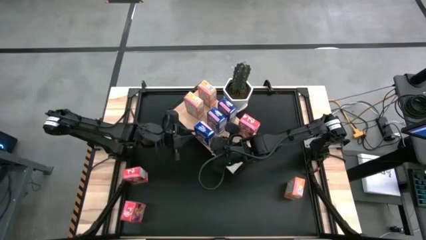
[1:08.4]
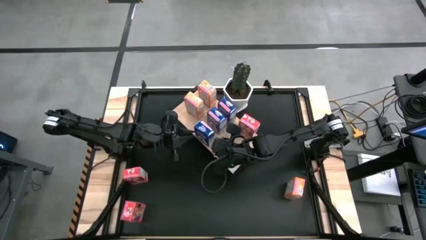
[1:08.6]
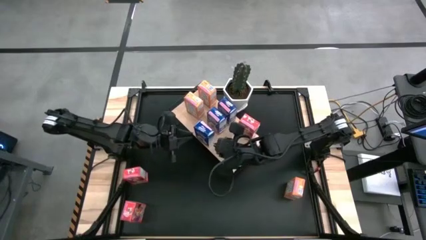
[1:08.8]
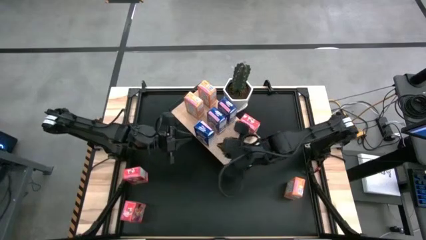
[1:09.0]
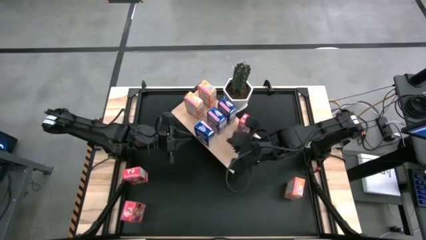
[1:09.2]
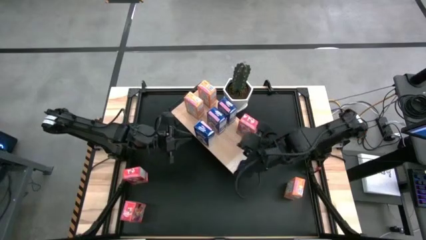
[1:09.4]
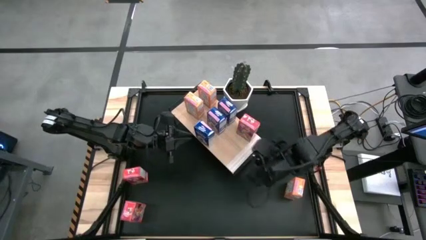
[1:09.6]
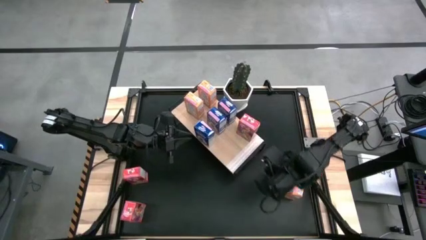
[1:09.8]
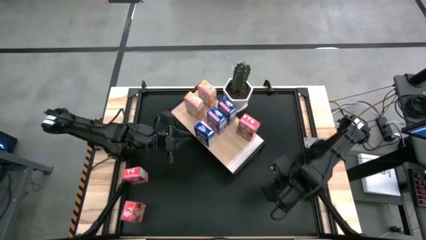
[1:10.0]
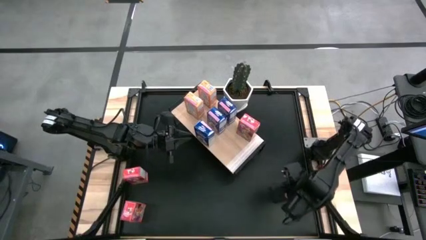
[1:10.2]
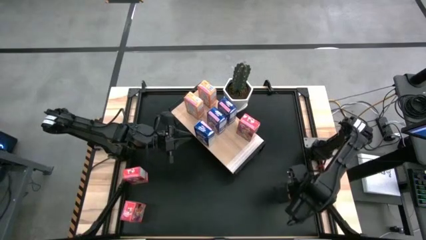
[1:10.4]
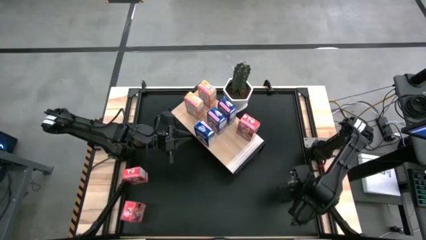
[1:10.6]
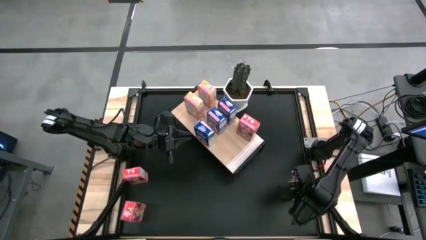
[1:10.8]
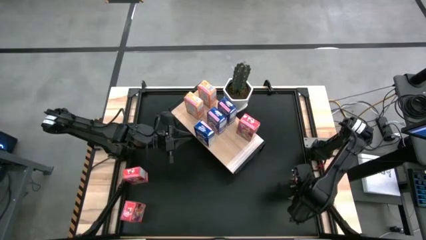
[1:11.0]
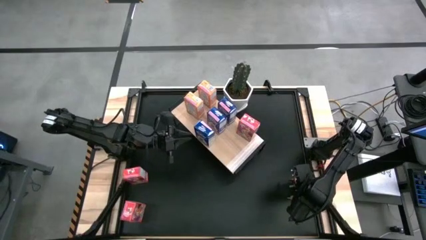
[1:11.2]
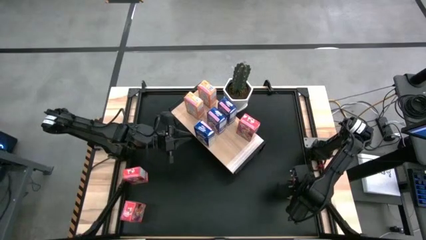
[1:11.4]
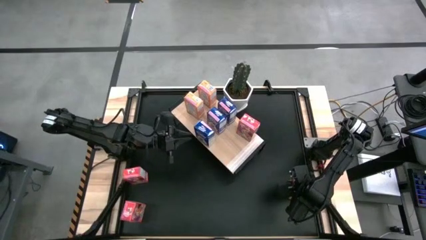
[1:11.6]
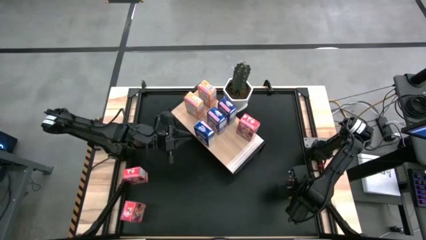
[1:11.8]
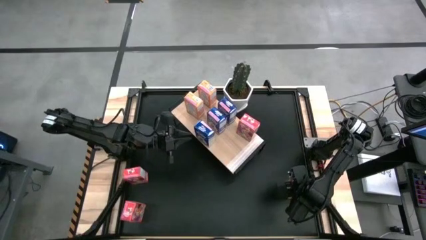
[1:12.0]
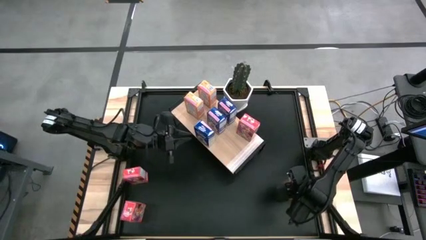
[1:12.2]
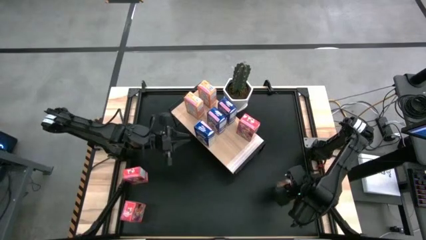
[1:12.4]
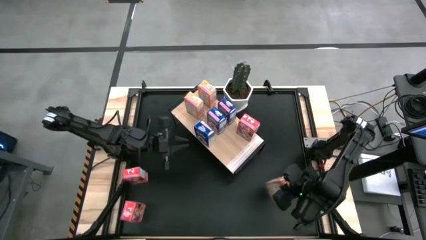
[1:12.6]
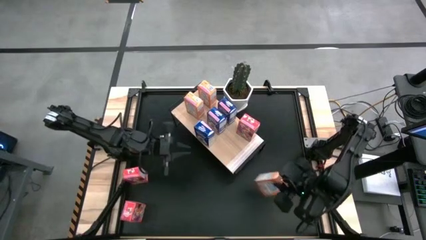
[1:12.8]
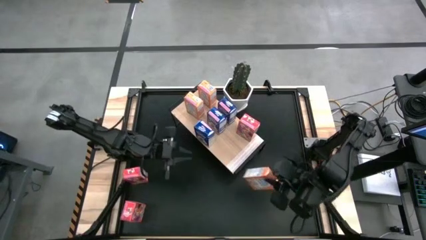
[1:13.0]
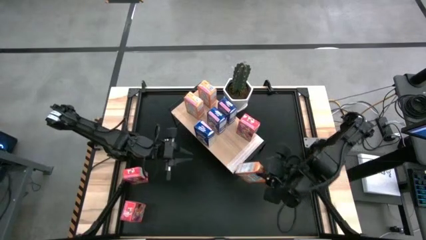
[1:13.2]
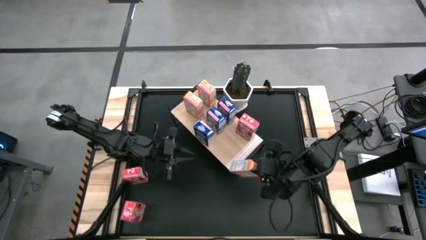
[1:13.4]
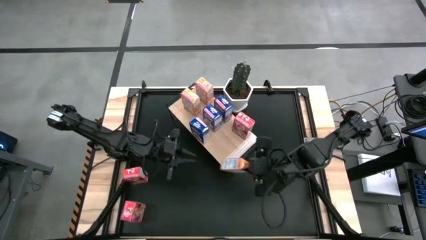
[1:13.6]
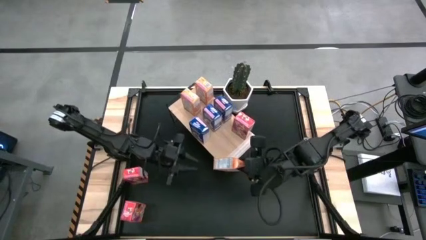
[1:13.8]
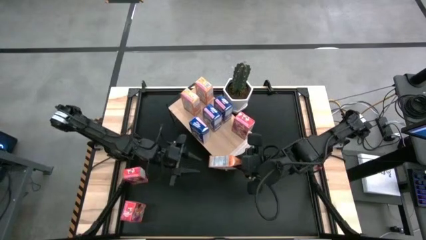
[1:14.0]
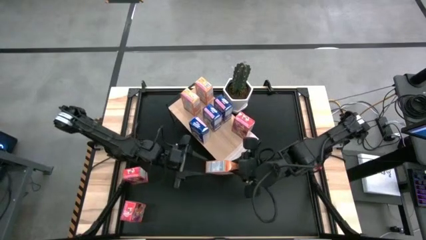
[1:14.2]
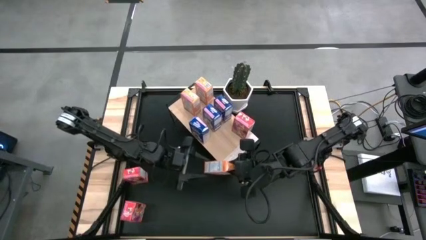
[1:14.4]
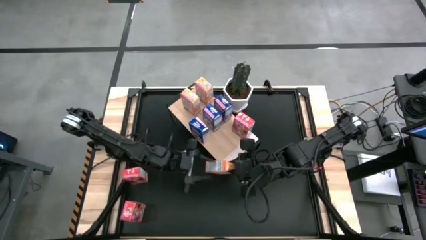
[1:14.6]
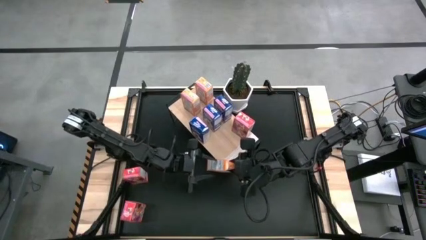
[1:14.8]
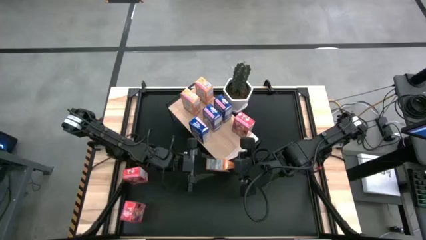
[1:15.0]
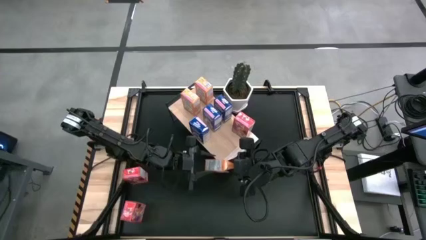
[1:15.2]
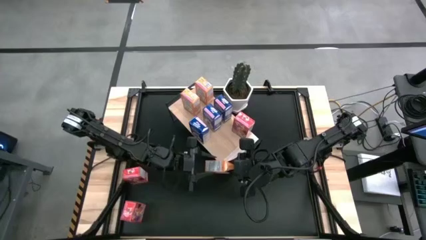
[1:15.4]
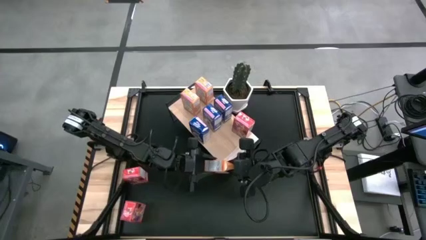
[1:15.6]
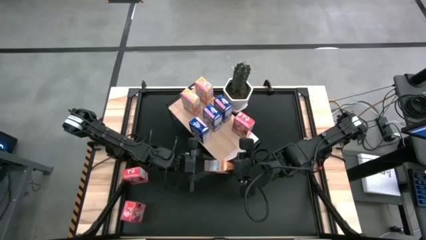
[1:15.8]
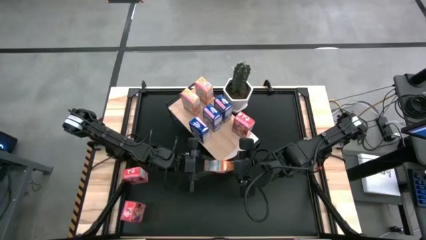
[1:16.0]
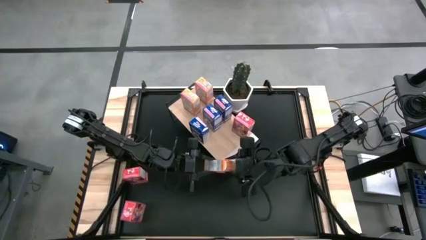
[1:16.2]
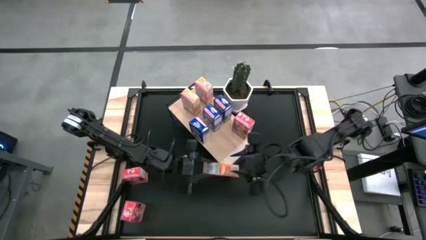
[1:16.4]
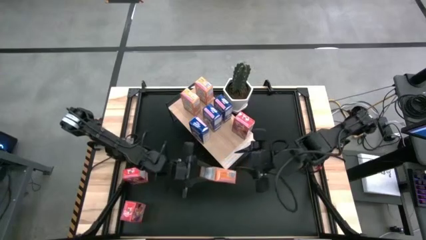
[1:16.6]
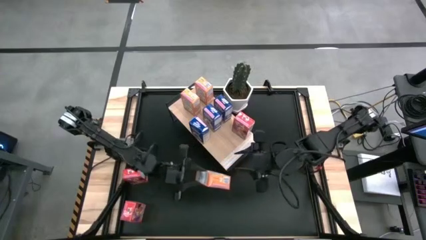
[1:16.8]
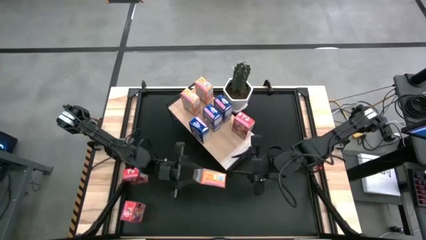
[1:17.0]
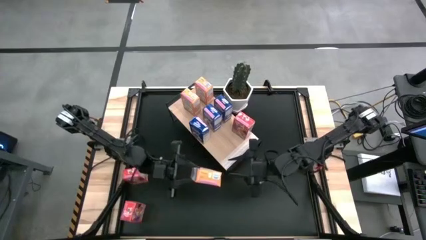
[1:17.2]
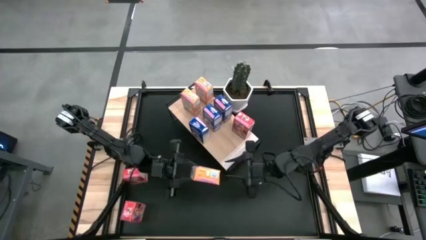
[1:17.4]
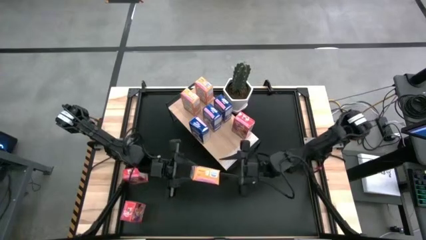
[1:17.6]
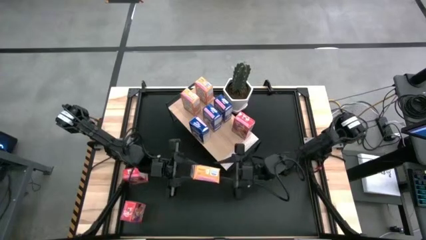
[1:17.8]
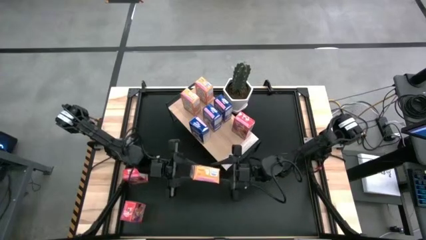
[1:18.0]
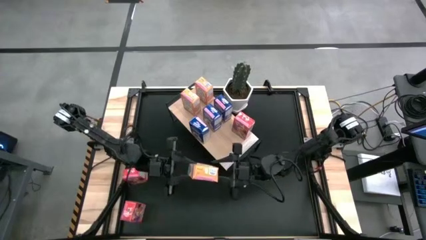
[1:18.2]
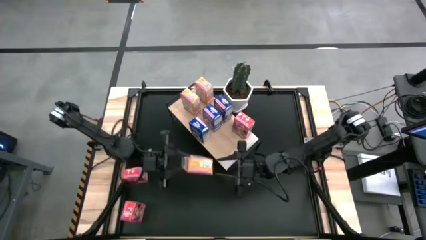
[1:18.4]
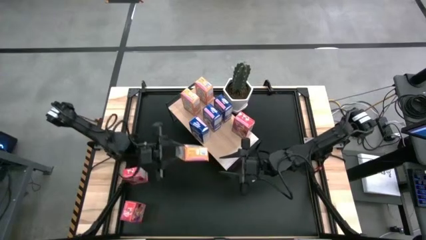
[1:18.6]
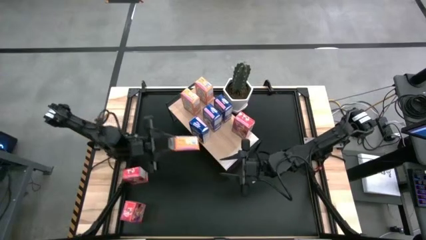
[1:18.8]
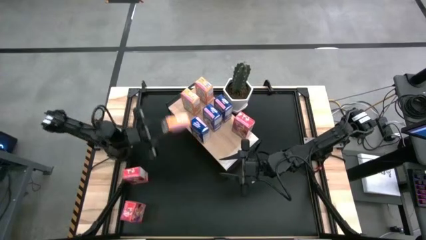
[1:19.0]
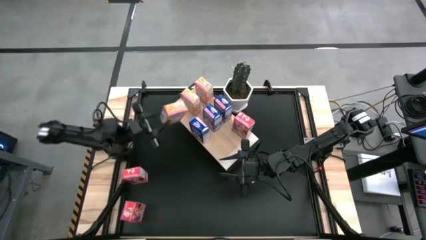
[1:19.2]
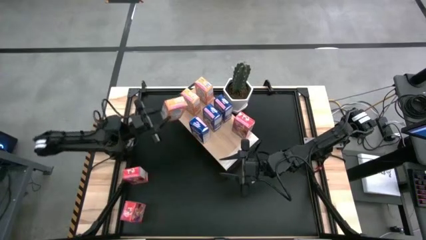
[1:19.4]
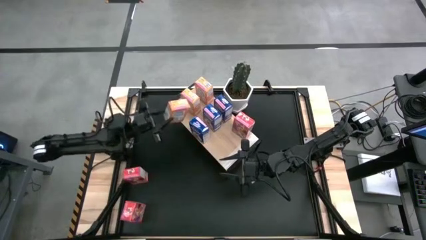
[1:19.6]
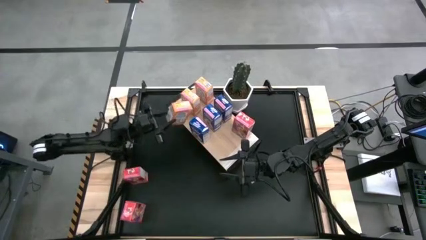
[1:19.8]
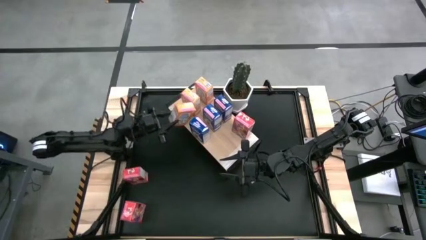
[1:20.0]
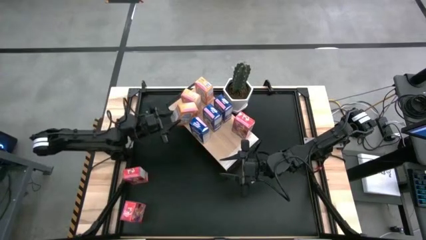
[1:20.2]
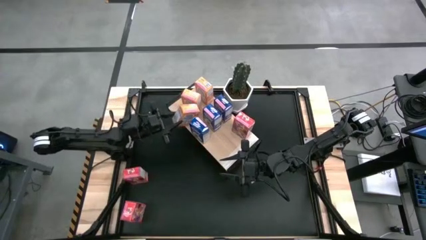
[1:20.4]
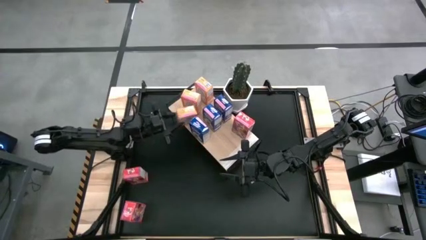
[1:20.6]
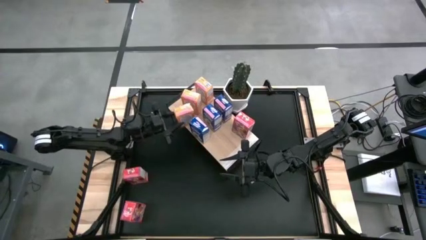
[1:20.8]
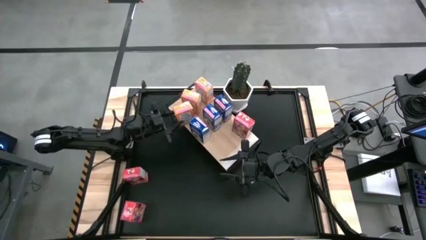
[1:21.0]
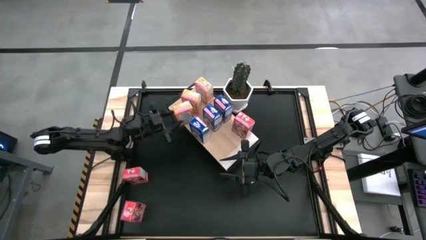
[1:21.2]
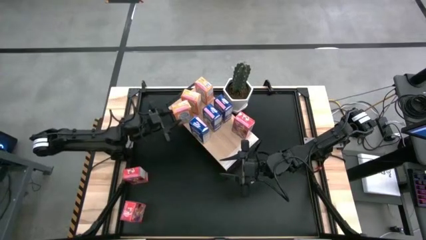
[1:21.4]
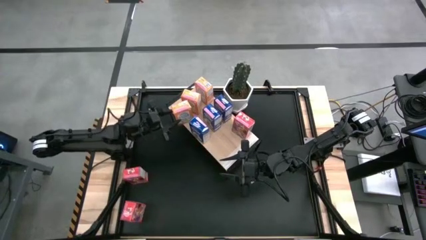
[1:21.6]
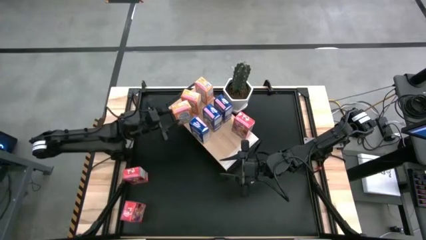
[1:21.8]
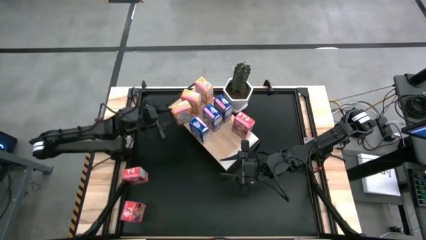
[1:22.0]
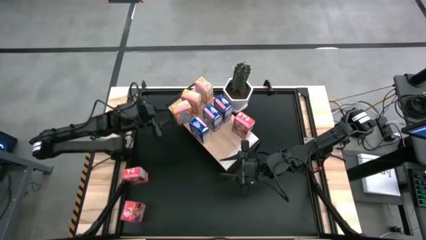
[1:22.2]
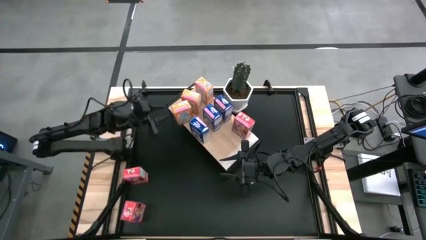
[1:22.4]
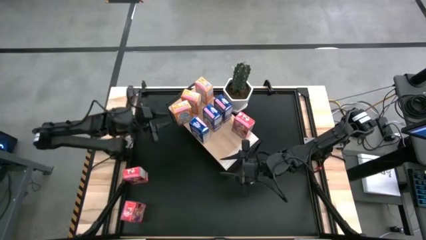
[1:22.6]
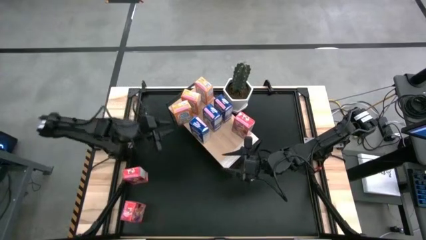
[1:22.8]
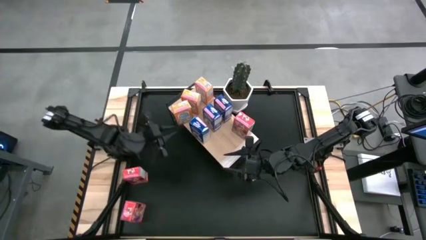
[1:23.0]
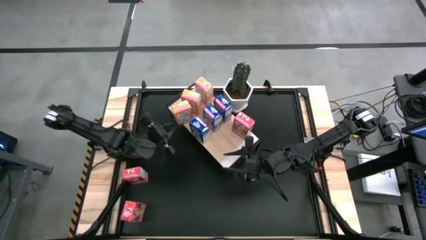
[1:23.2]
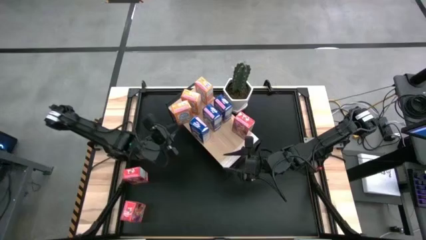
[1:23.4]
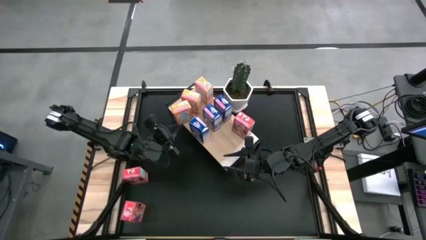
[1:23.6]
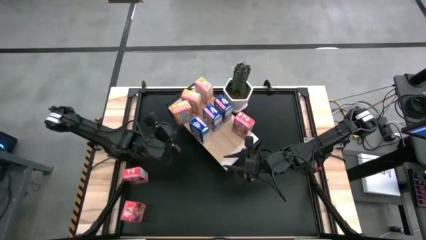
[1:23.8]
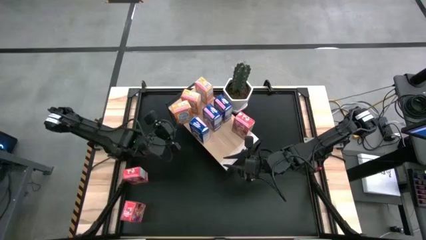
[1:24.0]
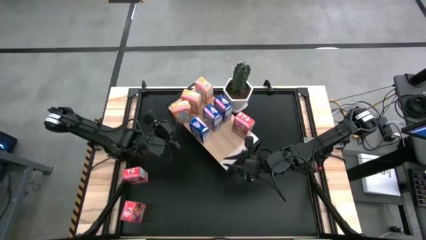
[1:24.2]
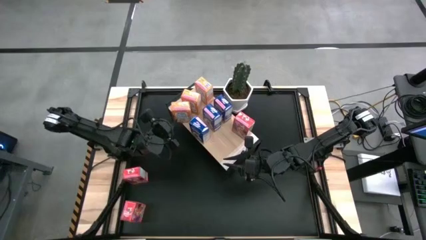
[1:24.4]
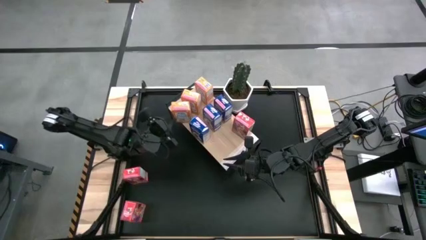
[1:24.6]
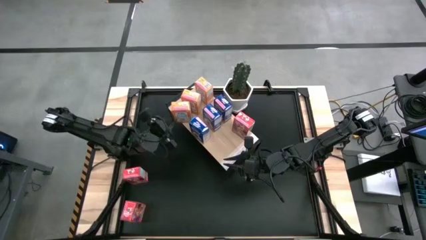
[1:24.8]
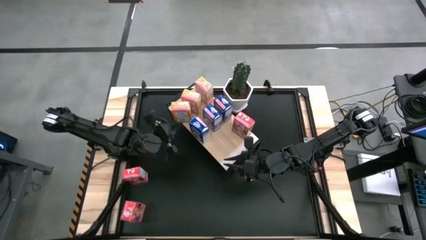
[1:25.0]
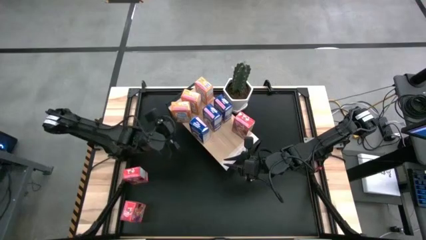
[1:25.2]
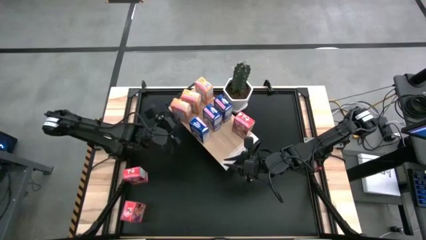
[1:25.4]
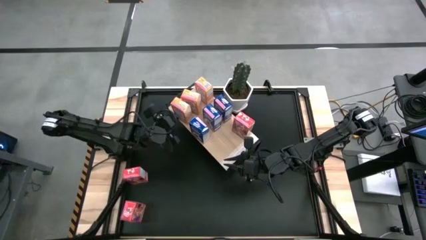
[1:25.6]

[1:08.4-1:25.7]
Task: Stack cereal on shelf
Put the orange cereal box on the shelf aligned with the other orange cereal boxes
